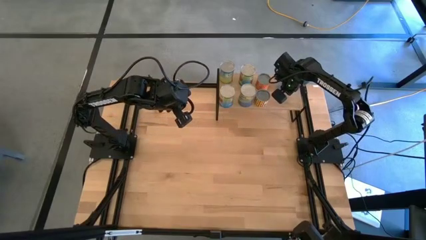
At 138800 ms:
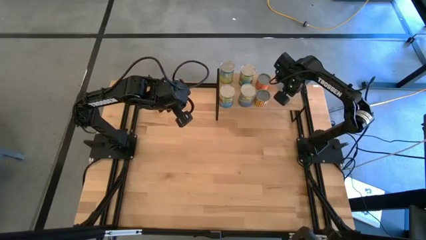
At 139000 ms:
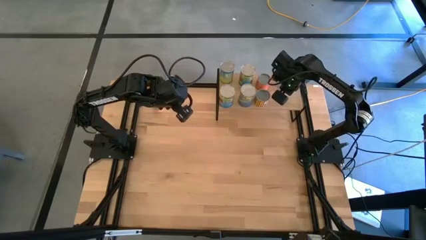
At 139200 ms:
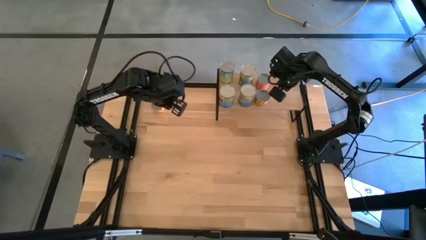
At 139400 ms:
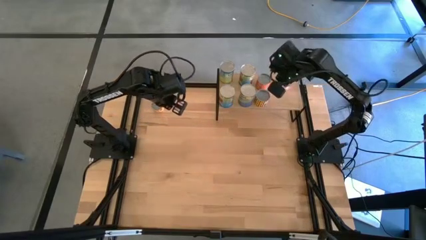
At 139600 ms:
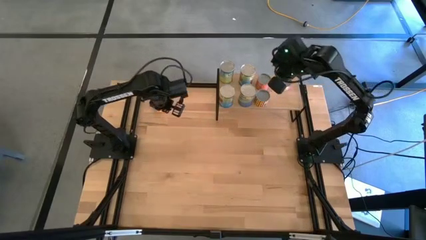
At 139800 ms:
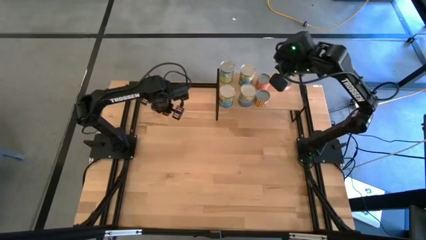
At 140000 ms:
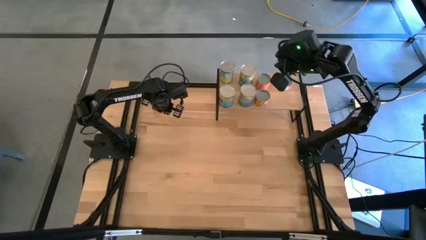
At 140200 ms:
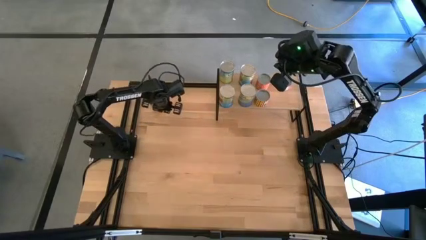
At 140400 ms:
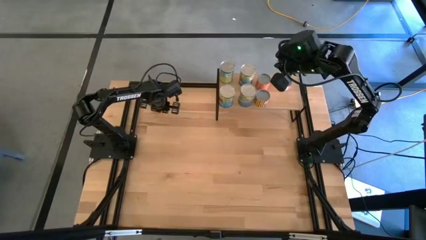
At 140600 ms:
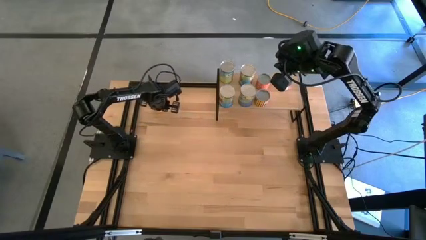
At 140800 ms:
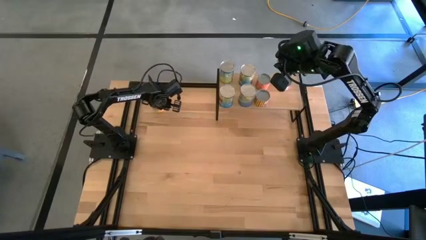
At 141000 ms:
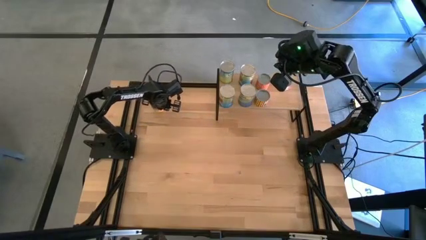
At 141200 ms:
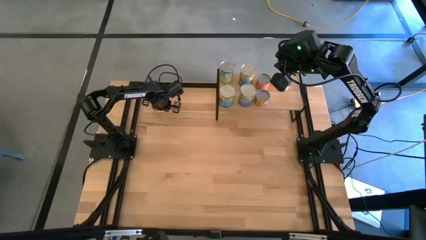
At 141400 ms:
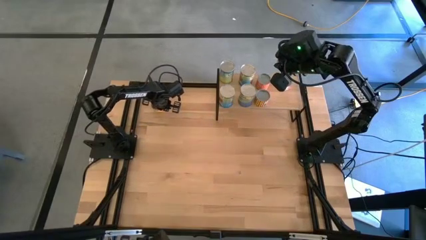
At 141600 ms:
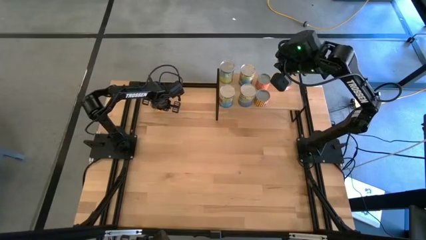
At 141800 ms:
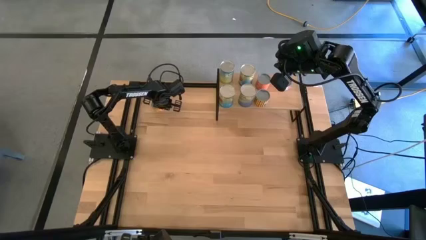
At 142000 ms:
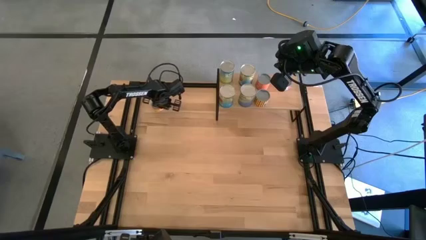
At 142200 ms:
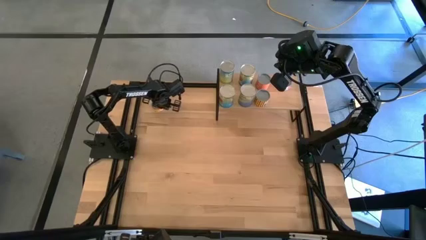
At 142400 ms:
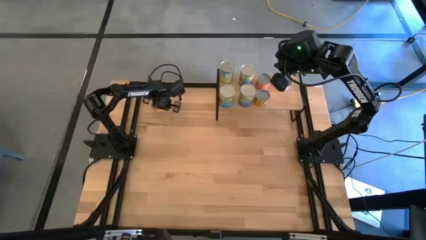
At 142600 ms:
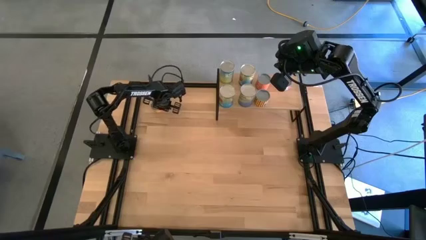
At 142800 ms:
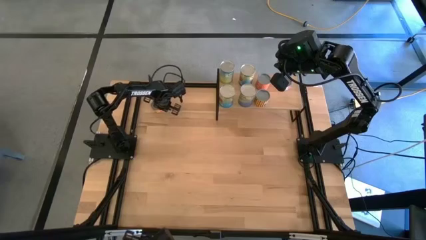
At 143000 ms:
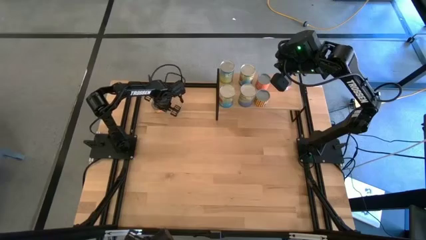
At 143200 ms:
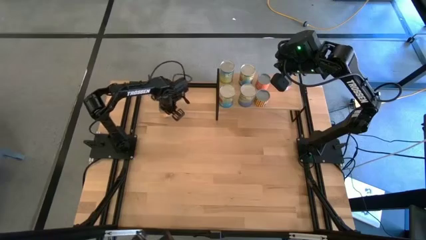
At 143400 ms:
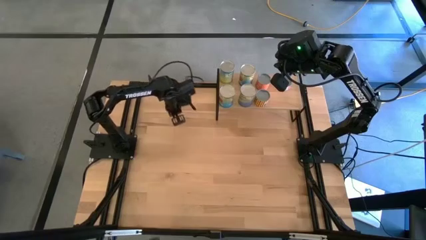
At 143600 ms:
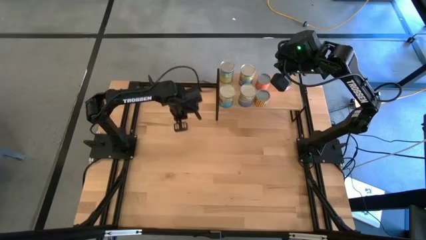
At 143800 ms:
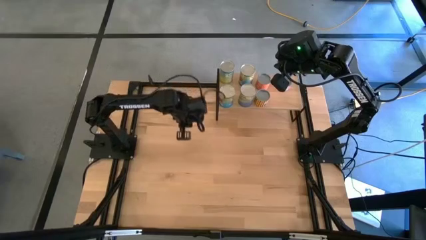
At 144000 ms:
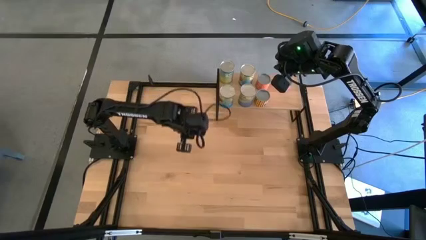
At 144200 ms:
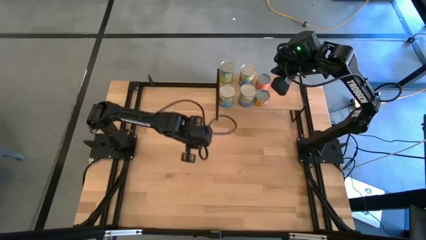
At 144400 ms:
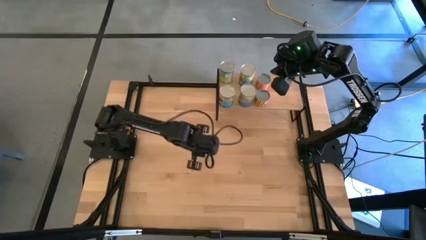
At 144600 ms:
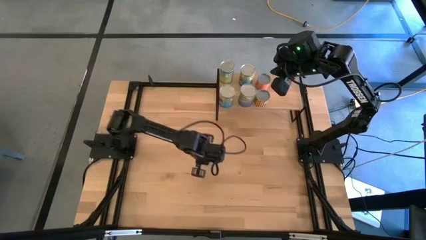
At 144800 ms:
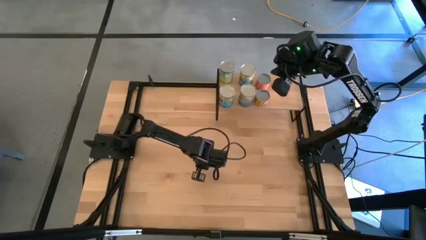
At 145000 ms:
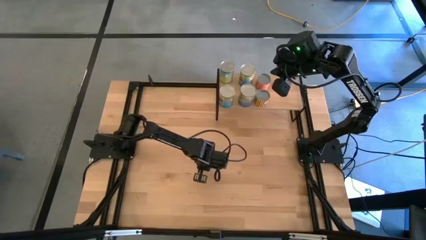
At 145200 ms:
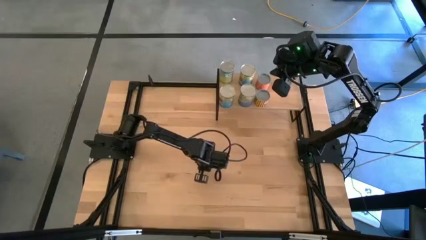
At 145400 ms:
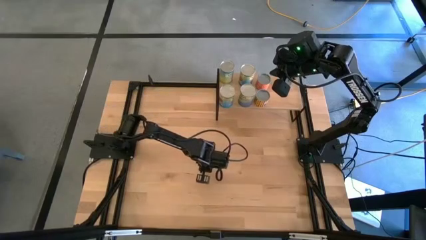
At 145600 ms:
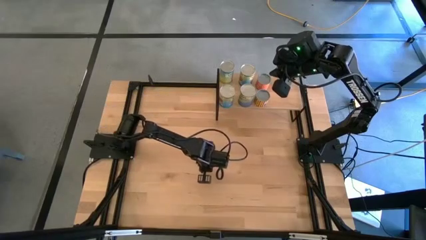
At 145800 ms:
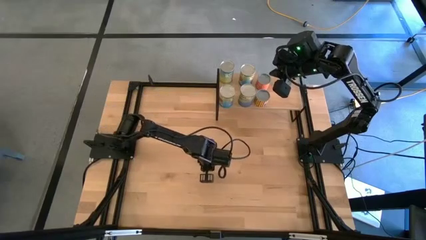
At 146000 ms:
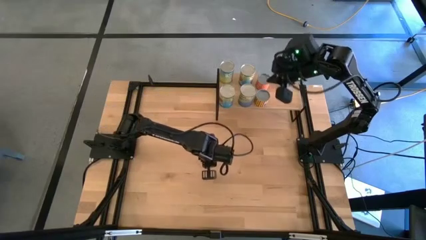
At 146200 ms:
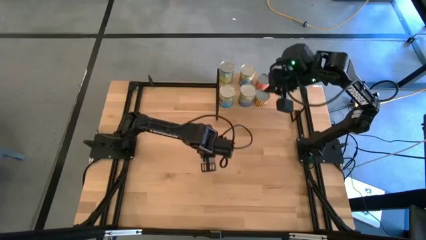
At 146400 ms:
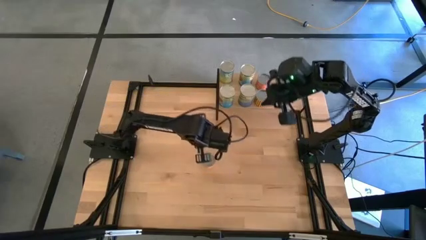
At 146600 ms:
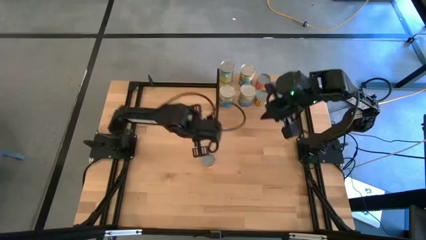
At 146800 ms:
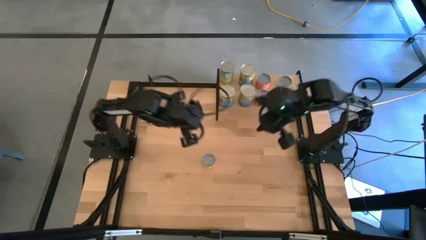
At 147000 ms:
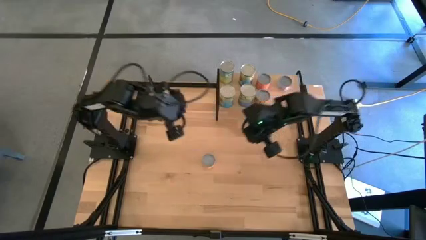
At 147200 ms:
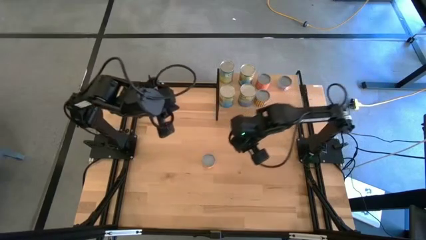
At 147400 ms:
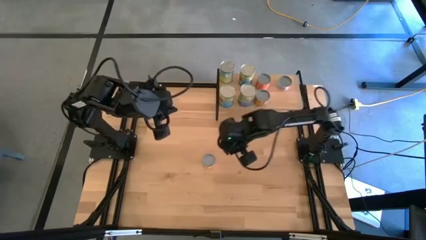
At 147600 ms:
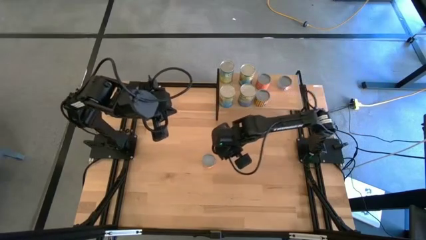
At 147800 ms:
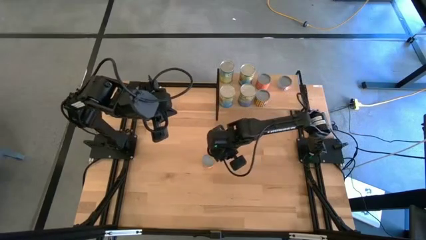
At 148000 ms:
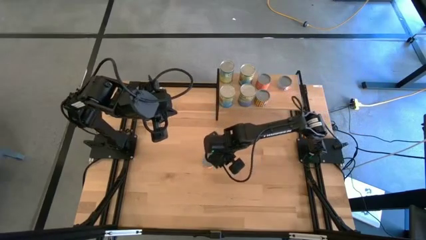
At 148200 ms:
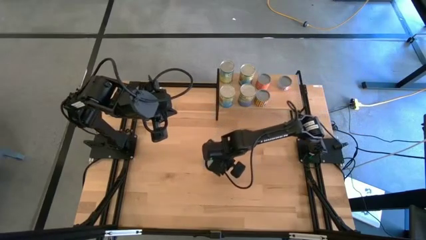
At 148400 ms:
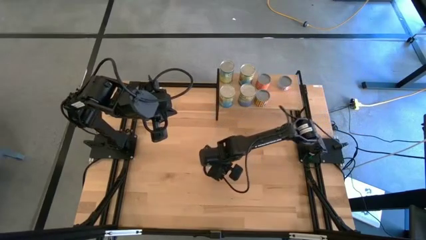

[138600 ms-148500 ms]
Task: Pick and place cans onto a shelf
Put the canned pineapple ring on the shelf
